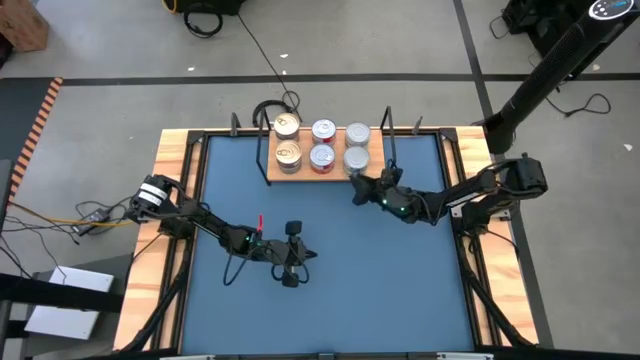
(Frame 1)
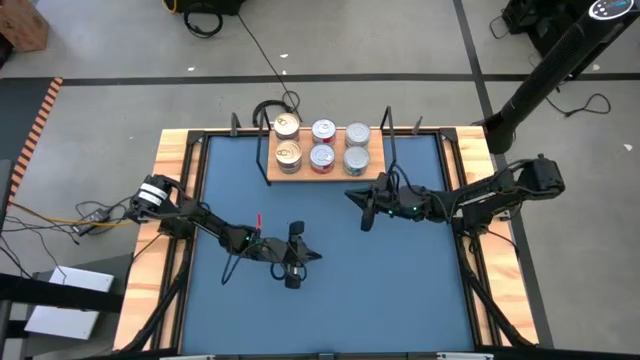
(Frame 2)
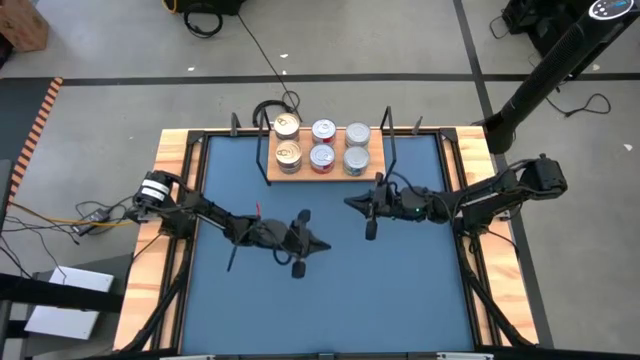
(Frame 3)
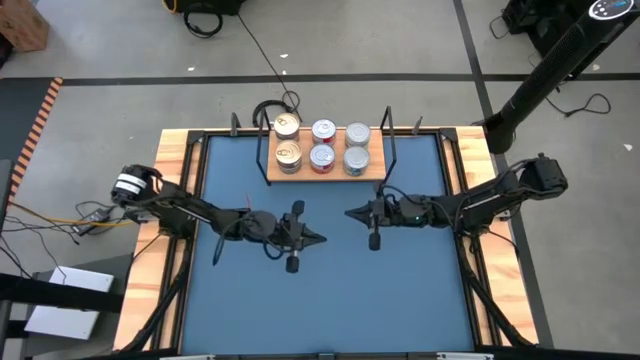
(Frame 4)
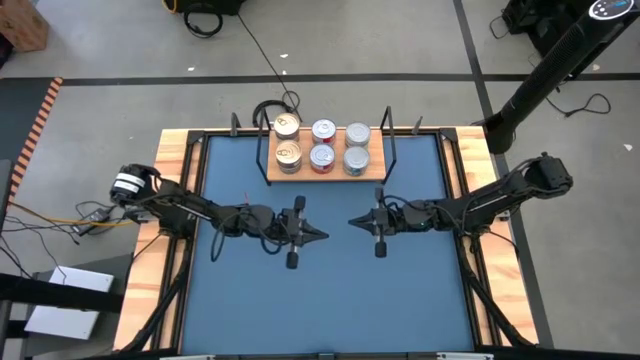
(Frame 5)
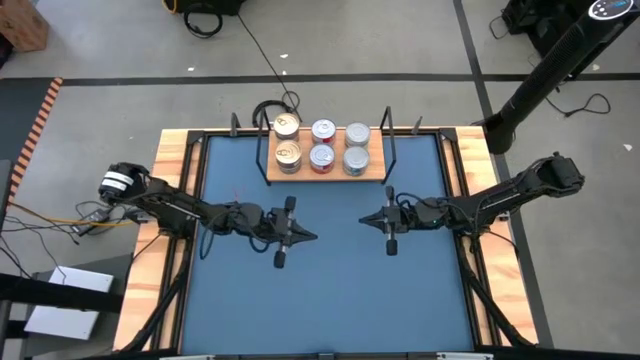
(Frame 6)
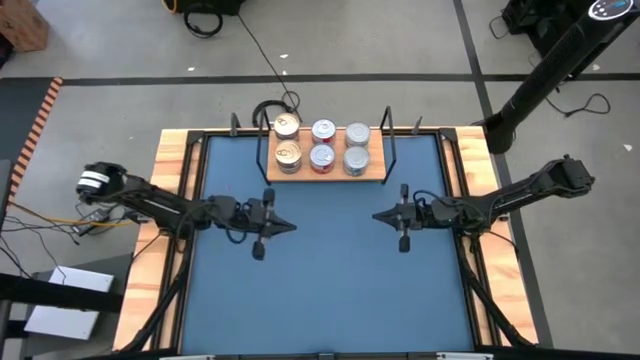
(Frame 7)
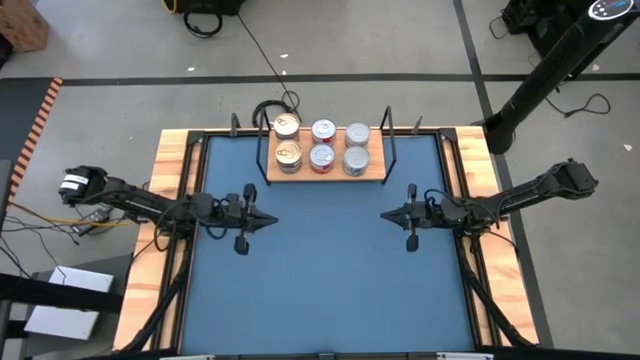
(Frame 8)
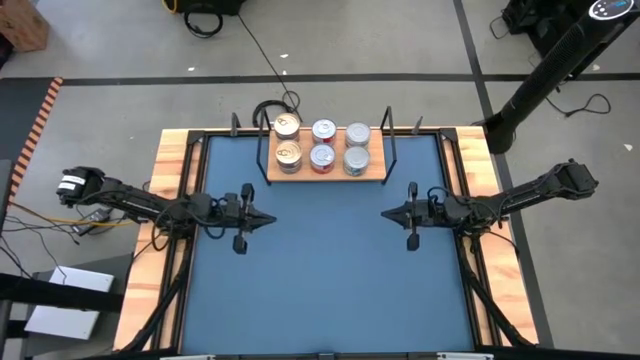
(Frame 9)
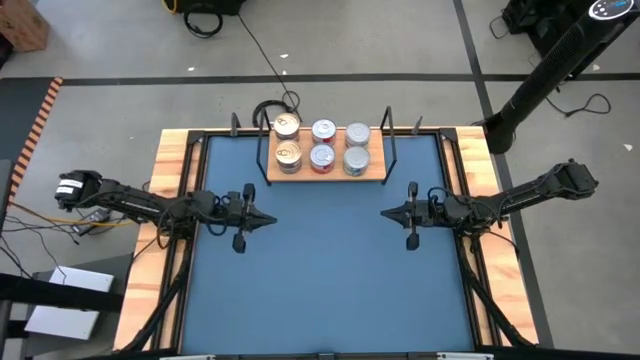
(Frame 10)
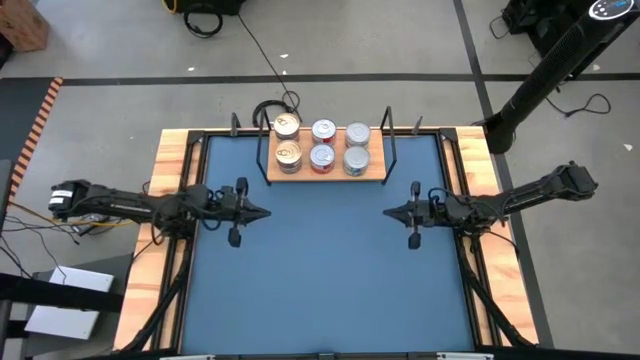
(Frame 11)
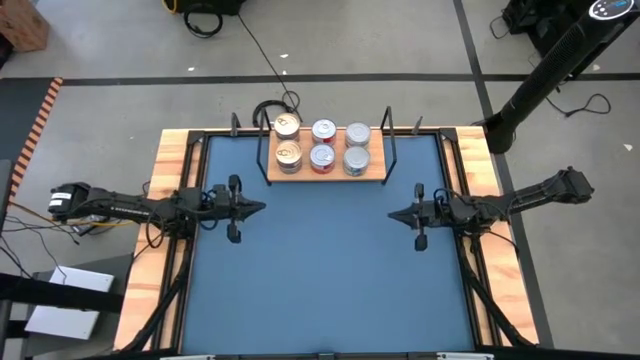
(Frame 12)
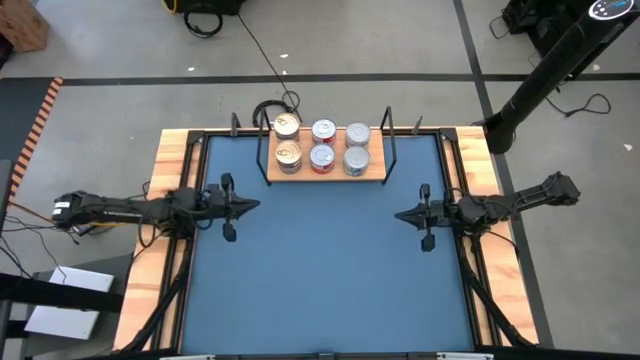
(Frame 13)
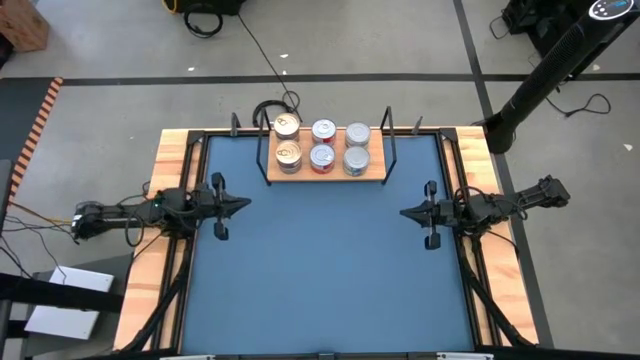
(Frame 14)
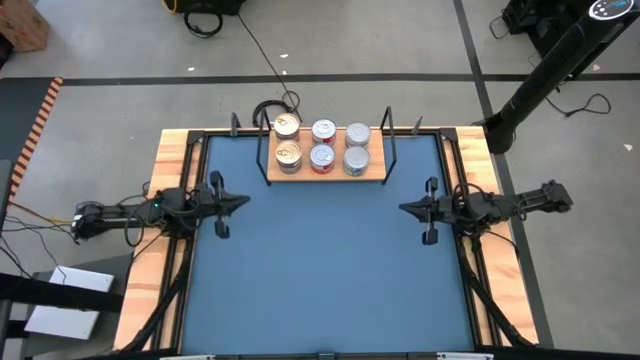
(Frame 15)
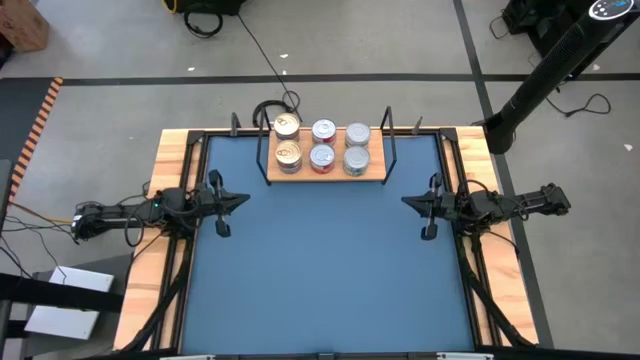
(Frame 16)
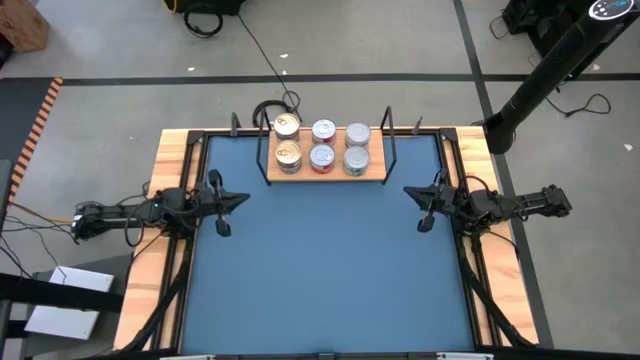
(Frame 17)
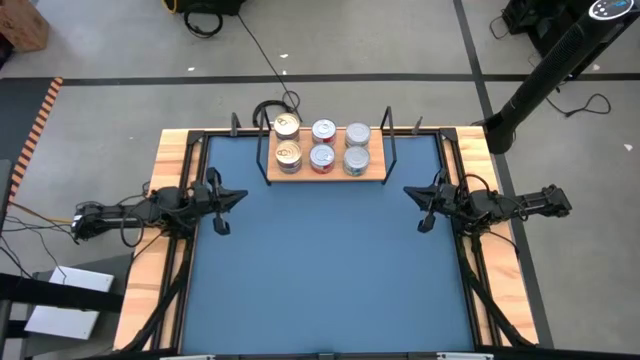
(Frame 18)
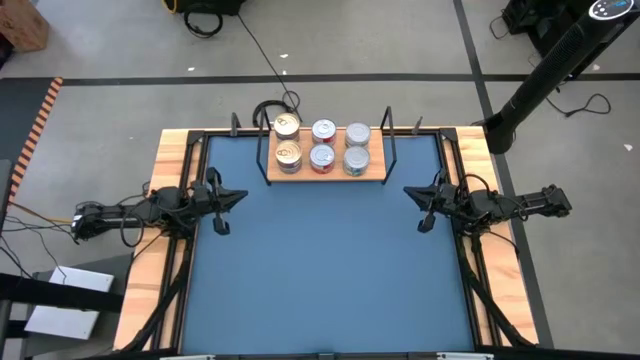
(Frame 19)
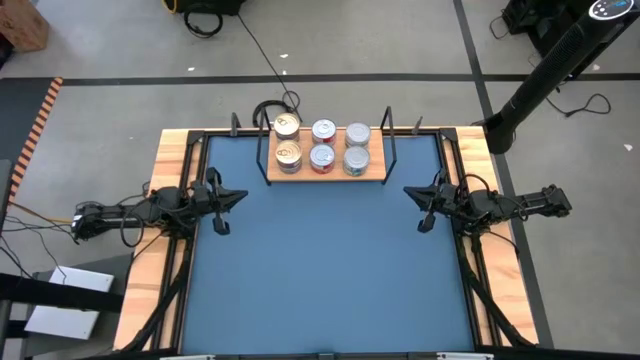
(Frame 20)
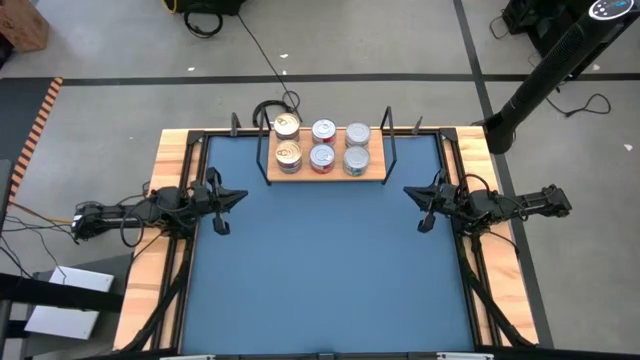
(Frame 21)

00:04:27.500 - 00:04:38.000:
Task: Stack canned seafood by type on shelf
Return to Home Position

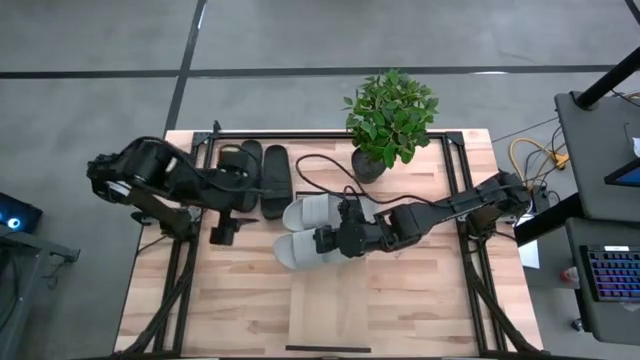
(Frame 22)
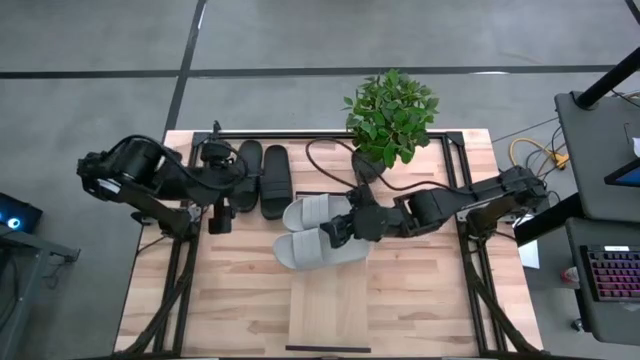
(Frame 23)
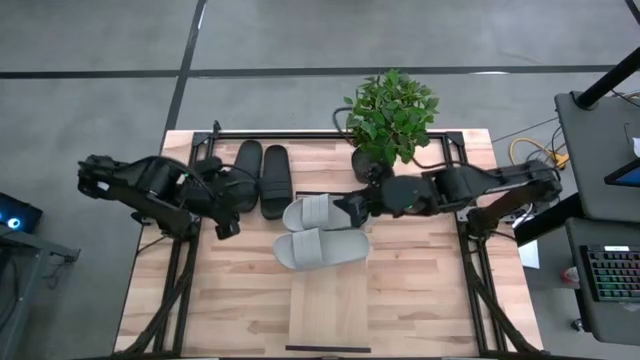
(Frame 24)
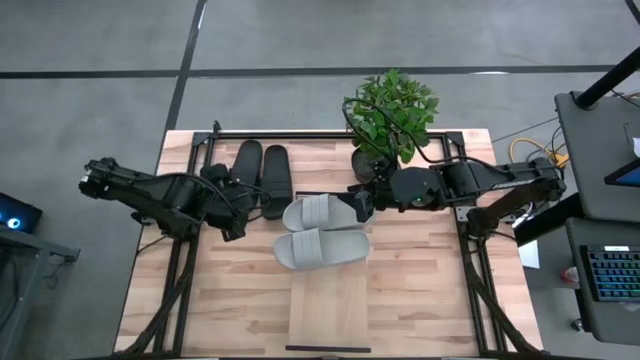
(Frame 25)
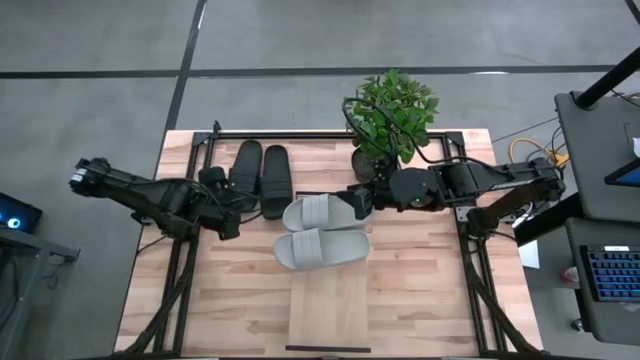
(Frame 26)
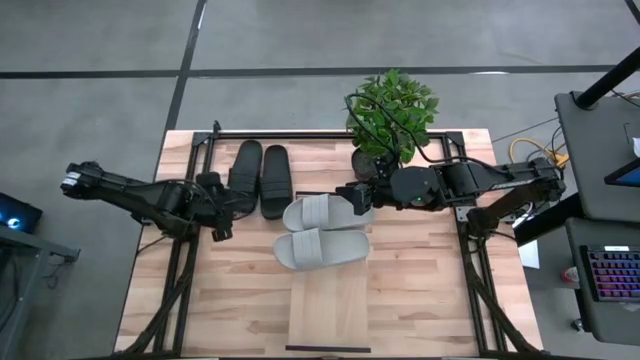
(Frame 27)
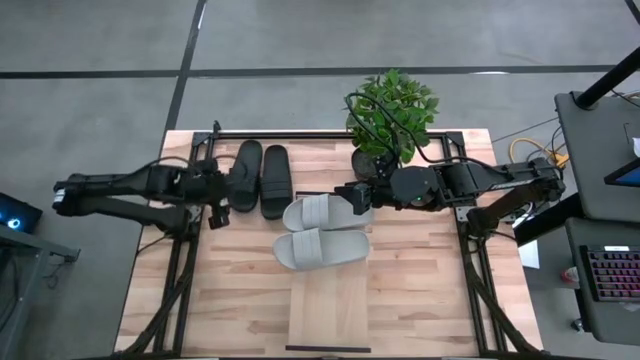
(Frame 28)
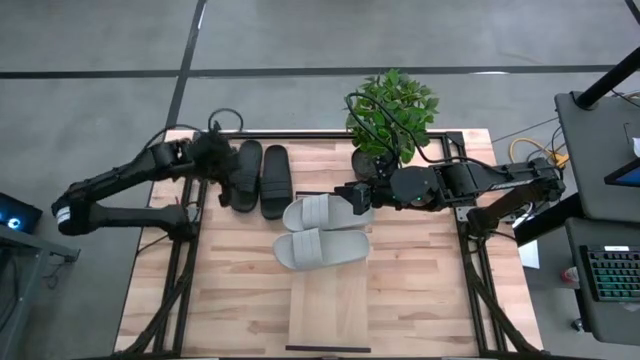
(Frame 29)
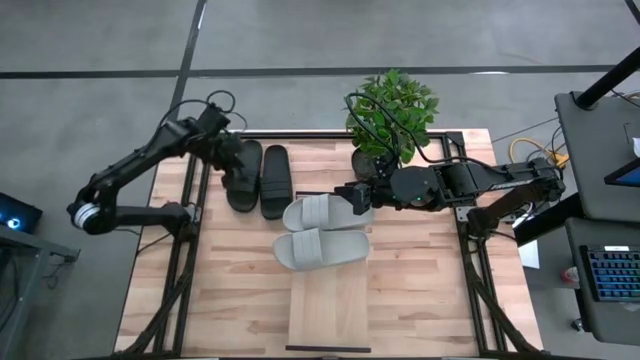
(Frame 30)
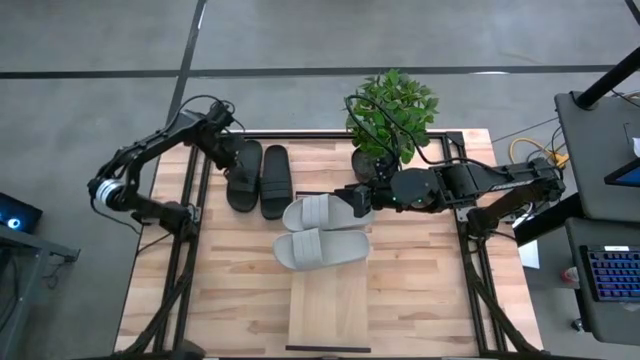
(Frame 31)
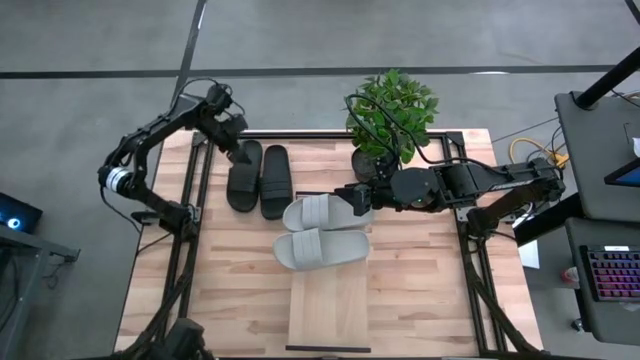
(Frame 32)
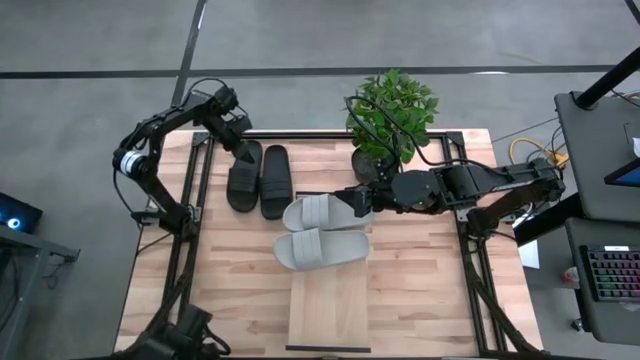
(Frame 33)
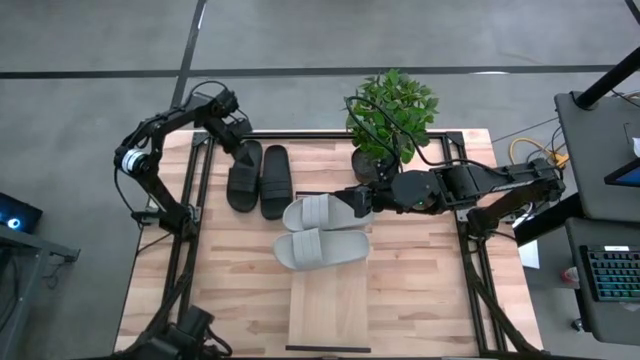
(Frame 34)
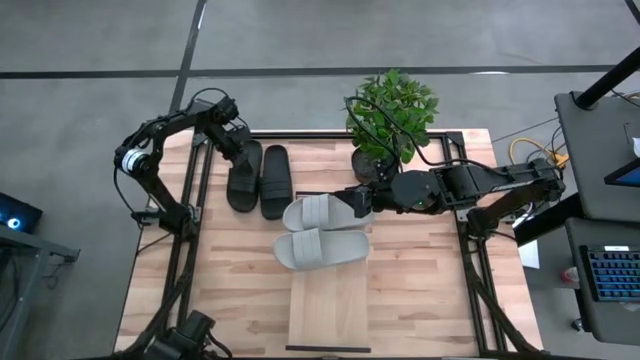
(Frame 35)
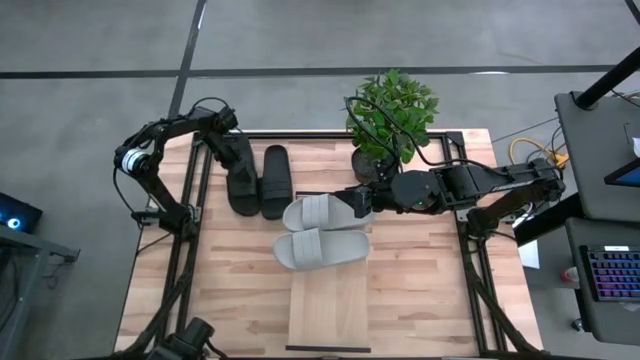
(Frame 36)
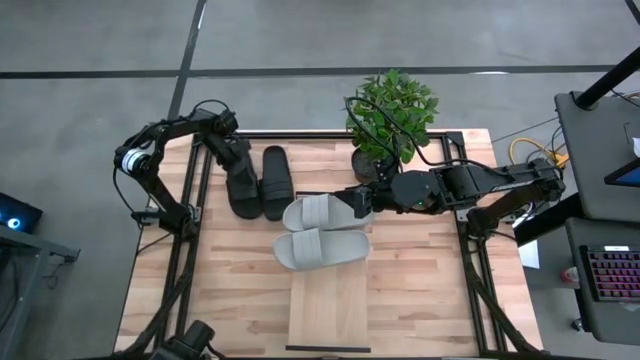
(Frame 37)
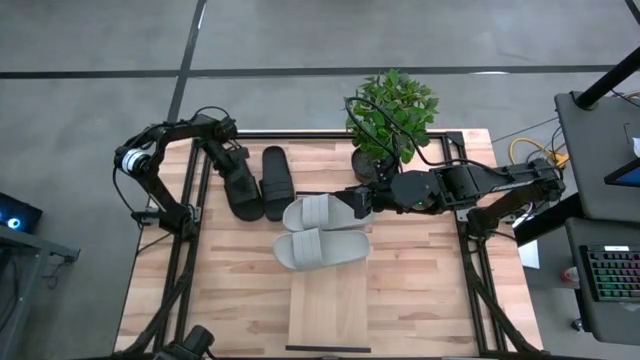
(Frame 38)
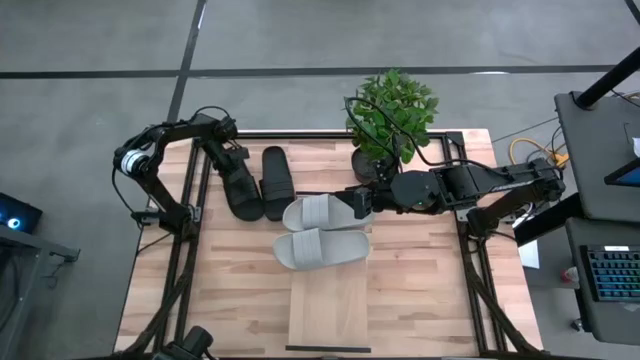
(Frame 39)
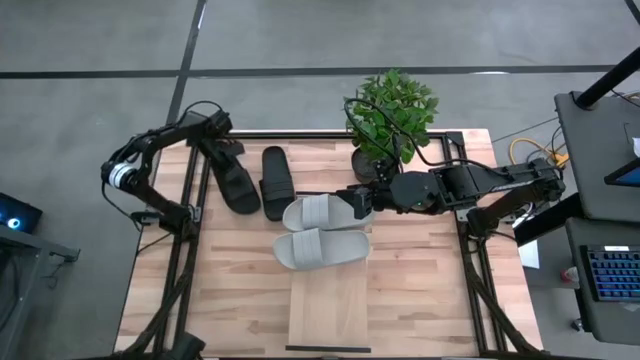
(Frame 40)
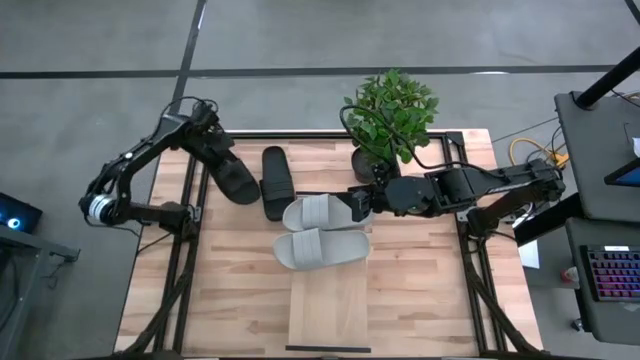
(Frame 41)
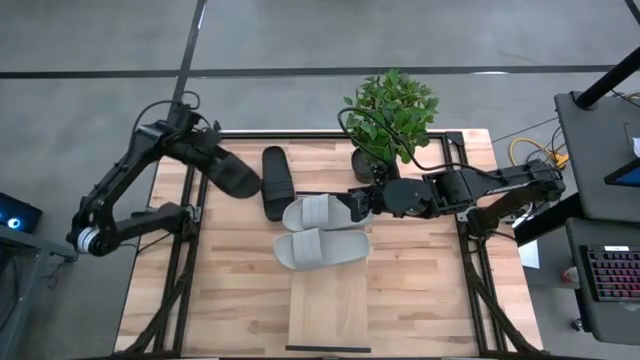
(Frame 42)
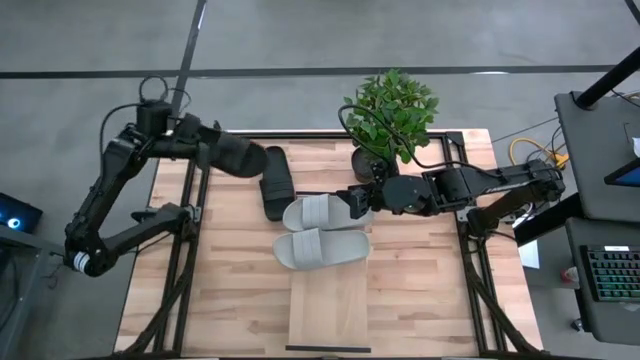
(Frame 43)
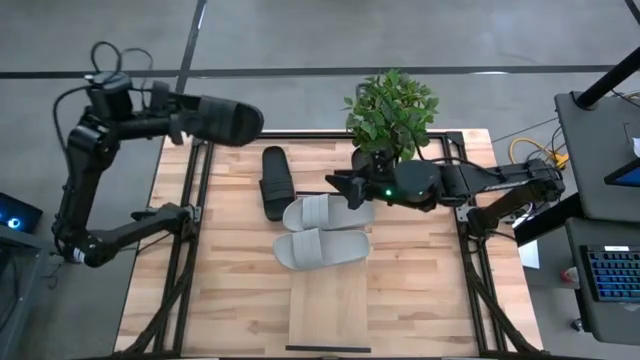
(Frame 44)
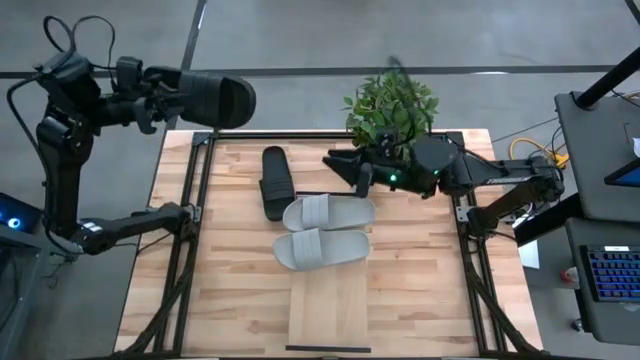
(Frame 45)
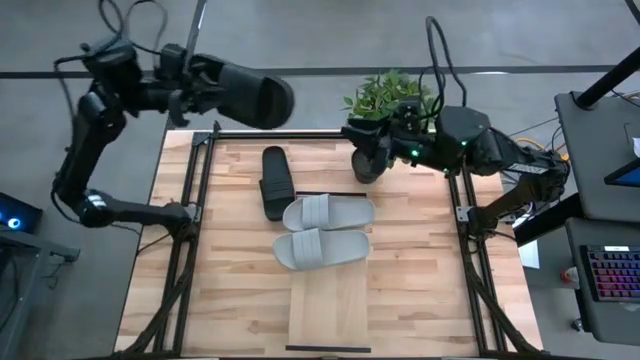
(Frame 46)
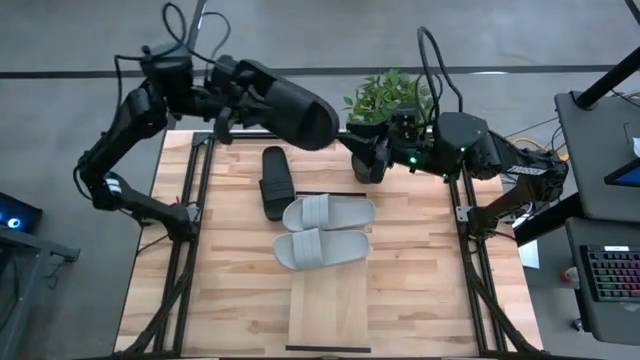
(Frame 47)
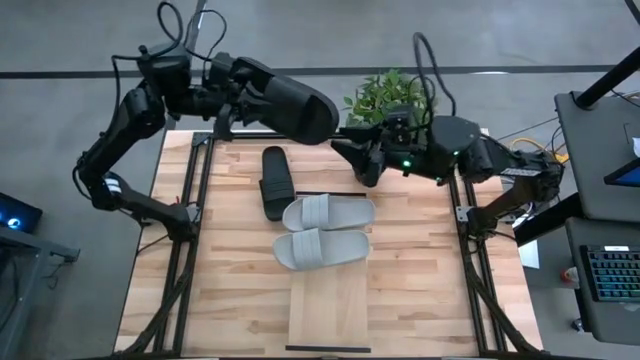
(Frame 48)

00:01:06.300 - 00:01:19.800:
Task: Pick and place slides into the shelf
Put the left black slipper on the shelf
